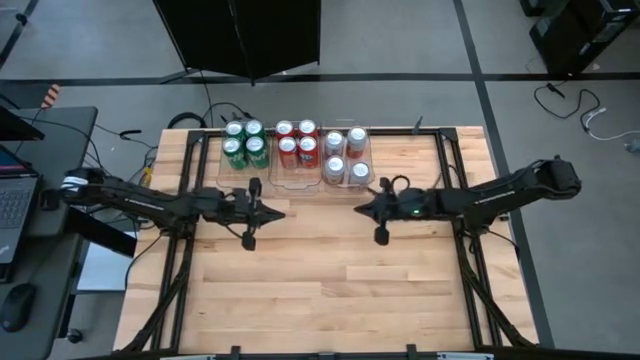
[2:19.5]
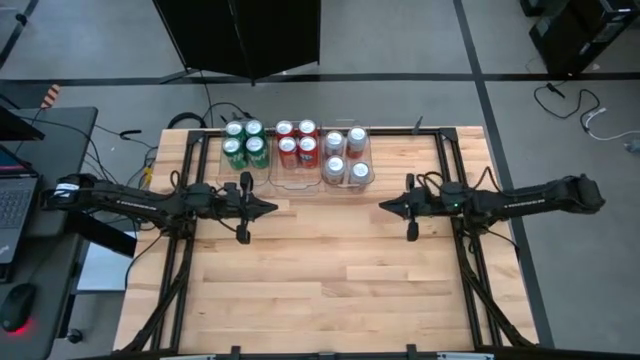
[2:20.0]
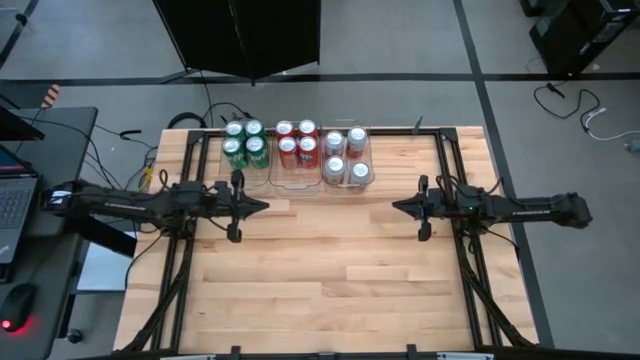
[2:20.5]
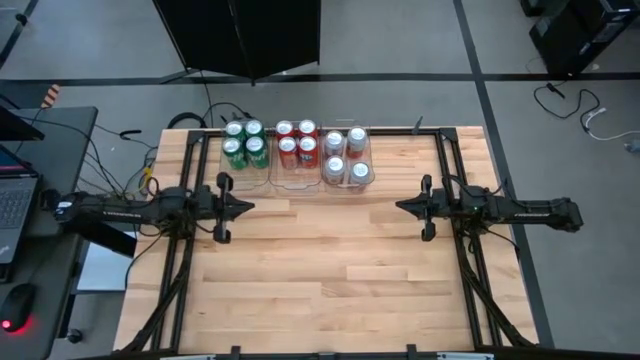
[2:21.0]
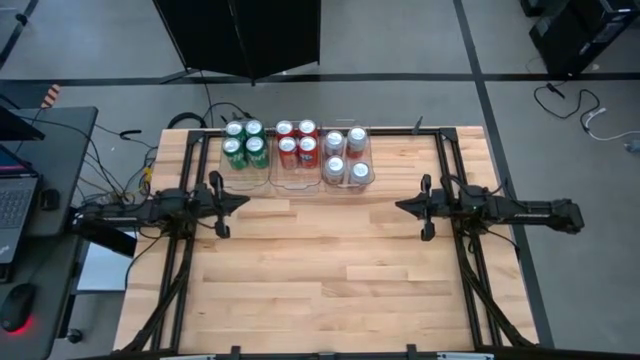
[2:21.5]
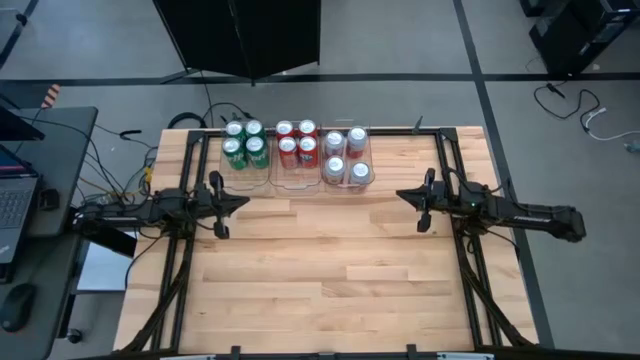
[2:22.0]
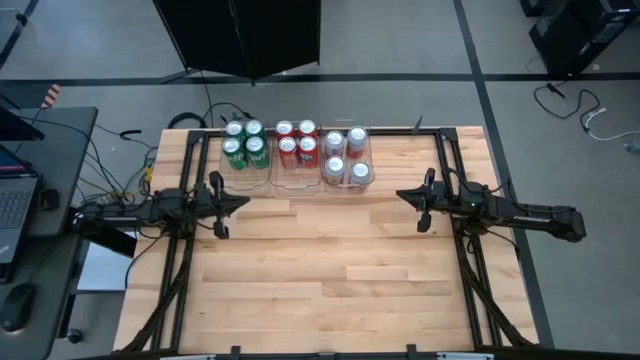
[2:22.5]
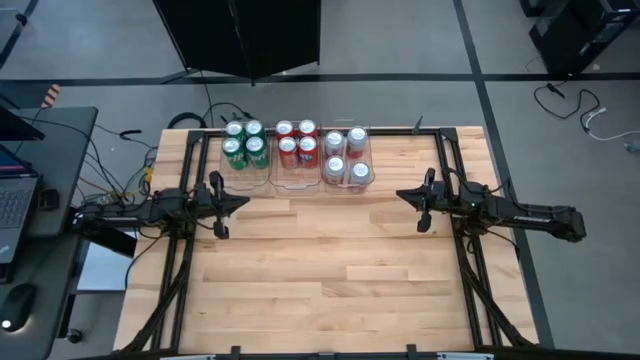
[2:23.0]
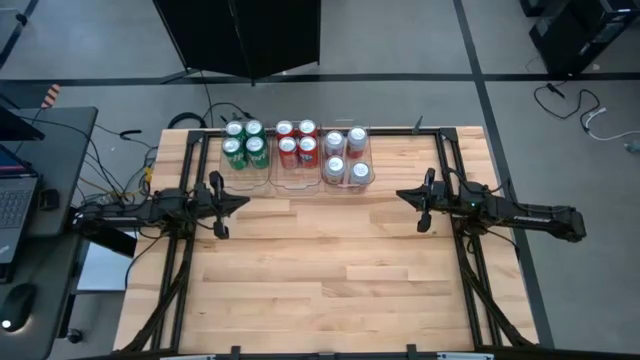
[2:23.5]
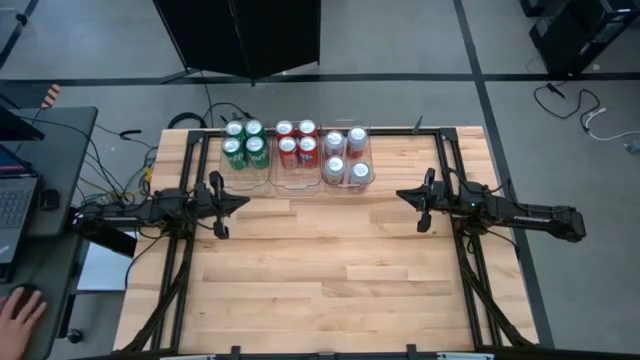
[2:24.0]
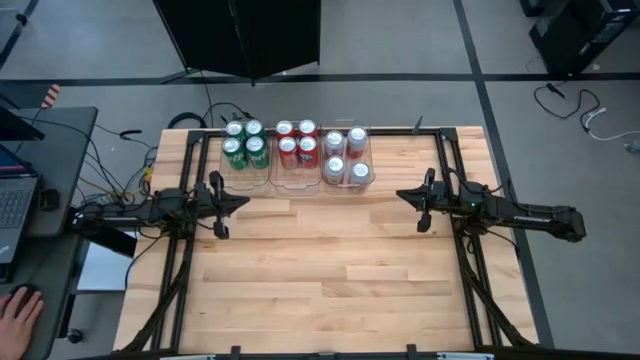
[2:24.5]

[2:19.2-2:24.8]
Task: Sort soda cans
Return to Home Position

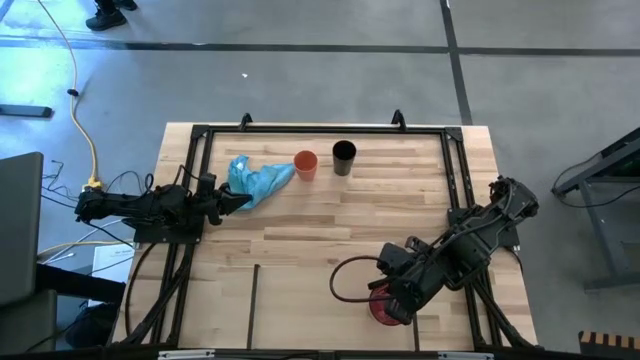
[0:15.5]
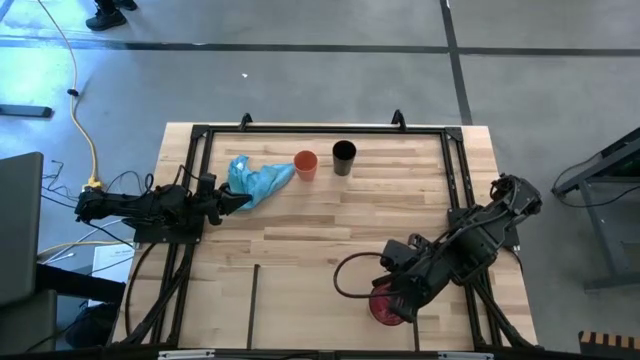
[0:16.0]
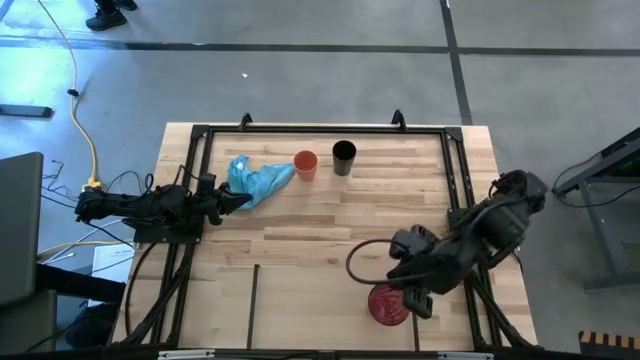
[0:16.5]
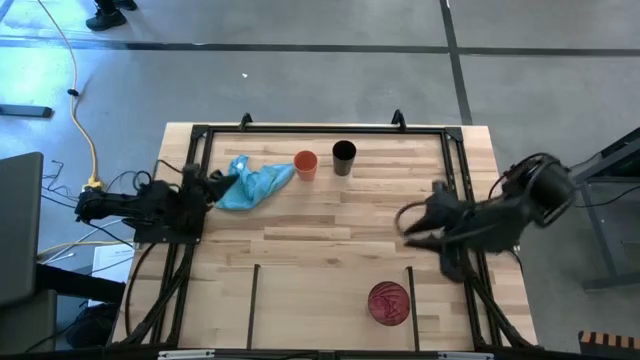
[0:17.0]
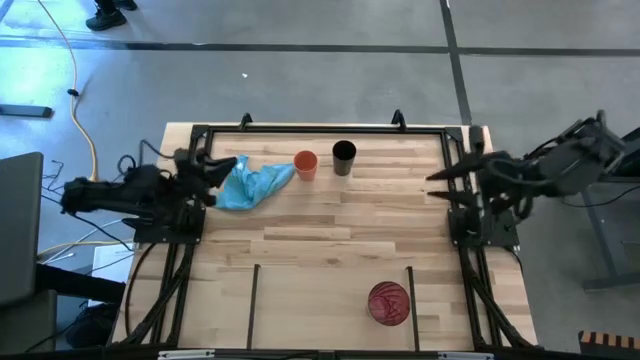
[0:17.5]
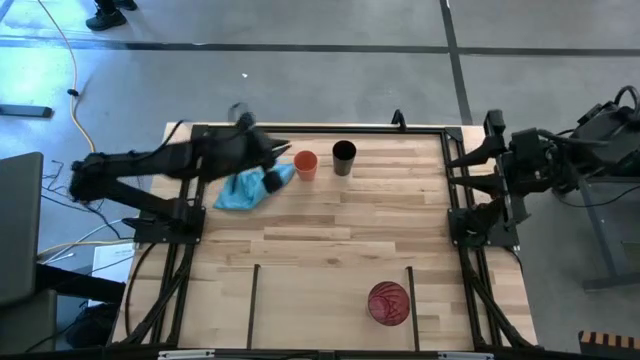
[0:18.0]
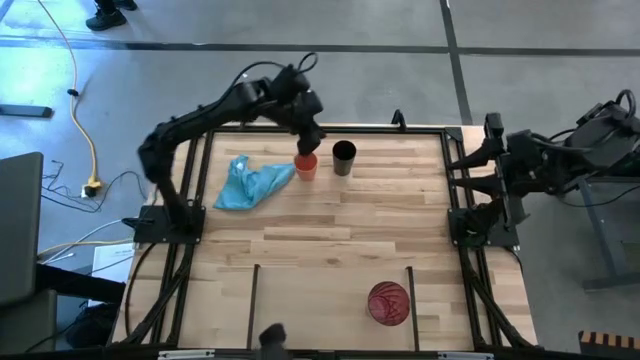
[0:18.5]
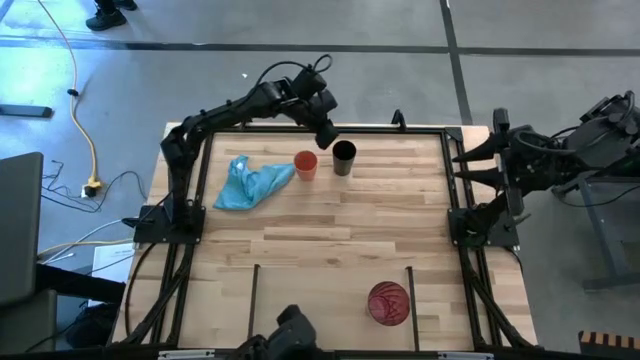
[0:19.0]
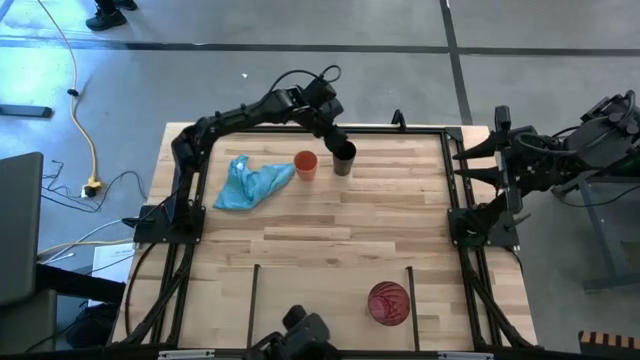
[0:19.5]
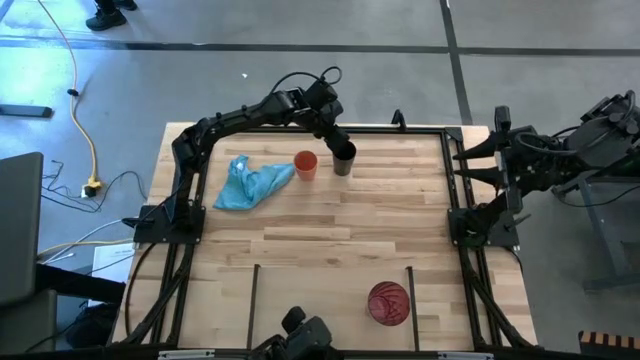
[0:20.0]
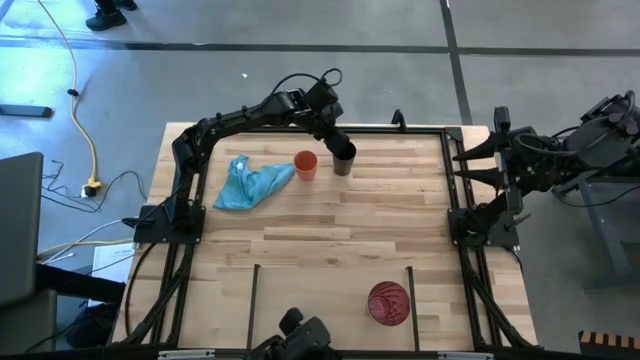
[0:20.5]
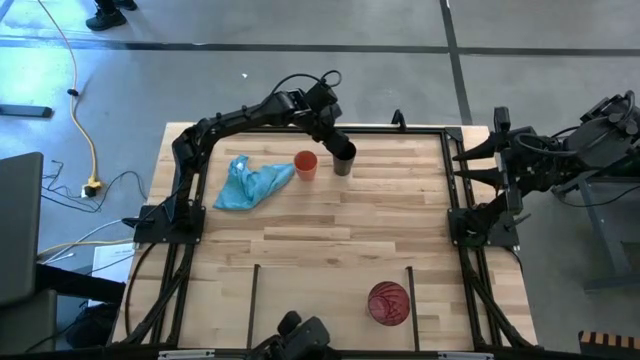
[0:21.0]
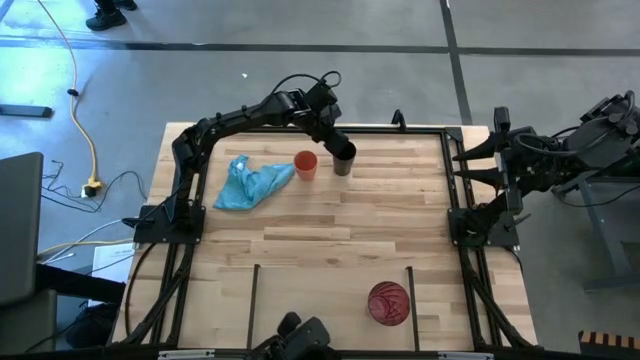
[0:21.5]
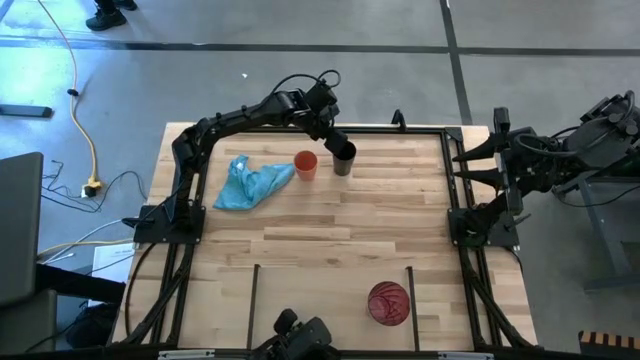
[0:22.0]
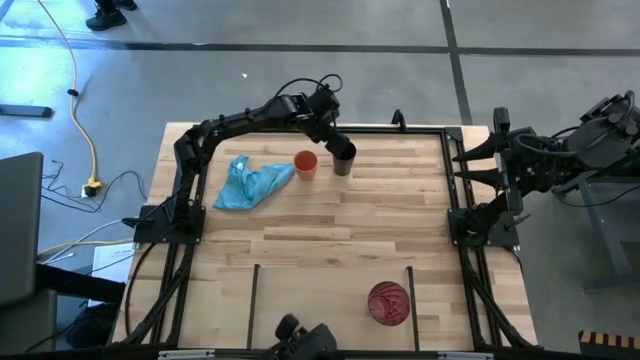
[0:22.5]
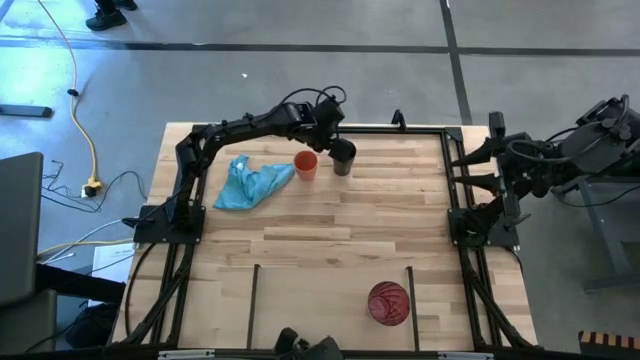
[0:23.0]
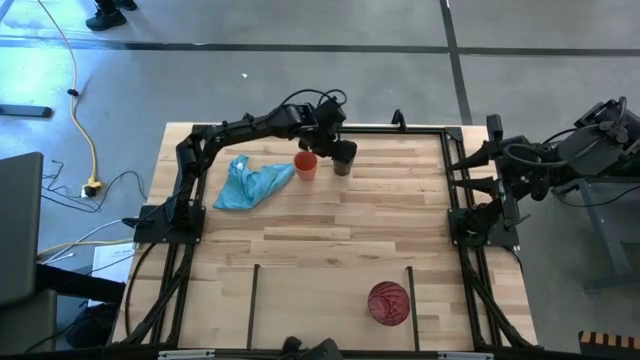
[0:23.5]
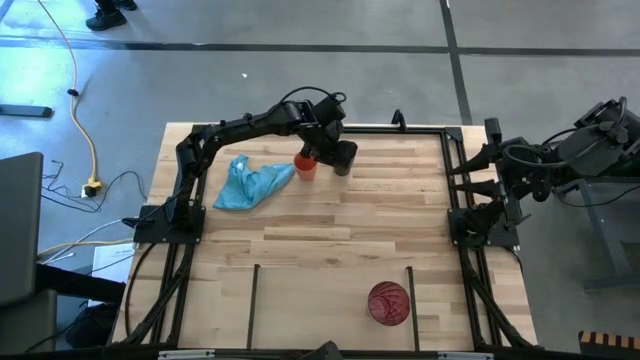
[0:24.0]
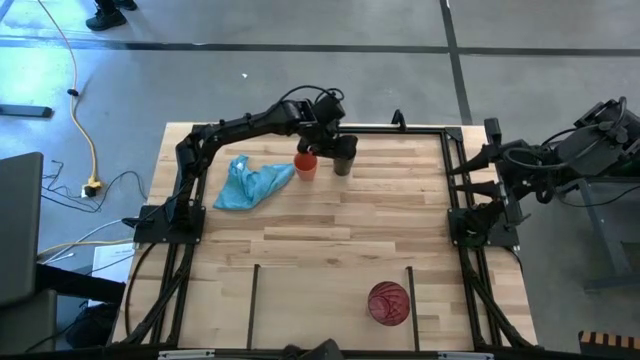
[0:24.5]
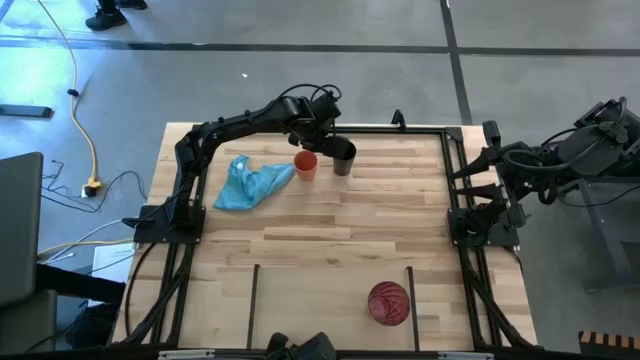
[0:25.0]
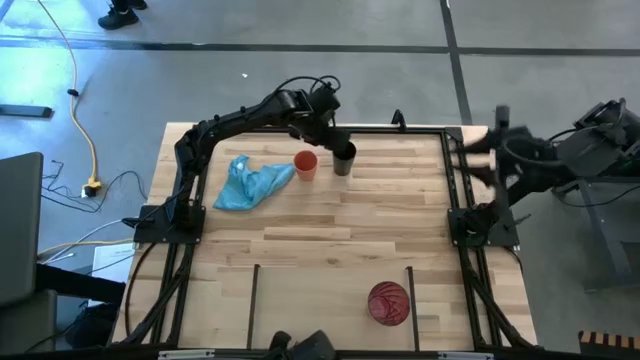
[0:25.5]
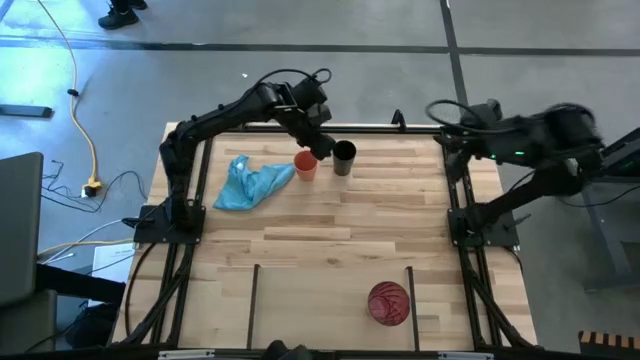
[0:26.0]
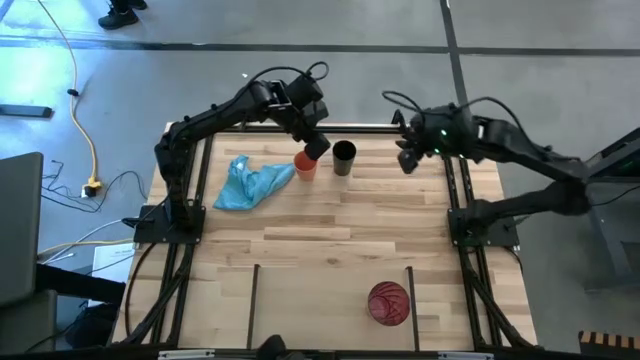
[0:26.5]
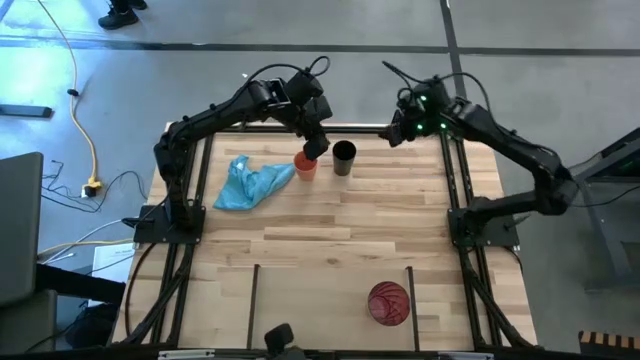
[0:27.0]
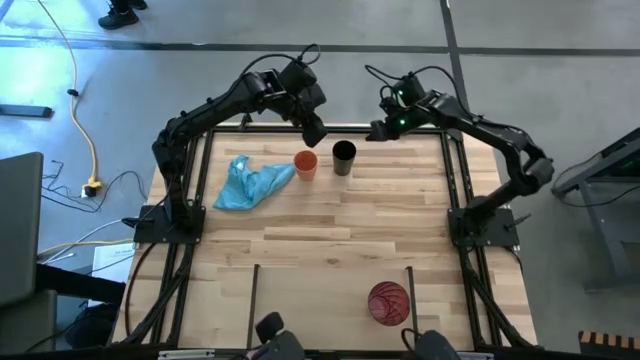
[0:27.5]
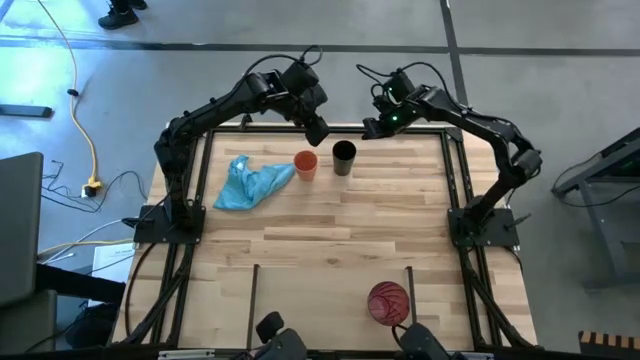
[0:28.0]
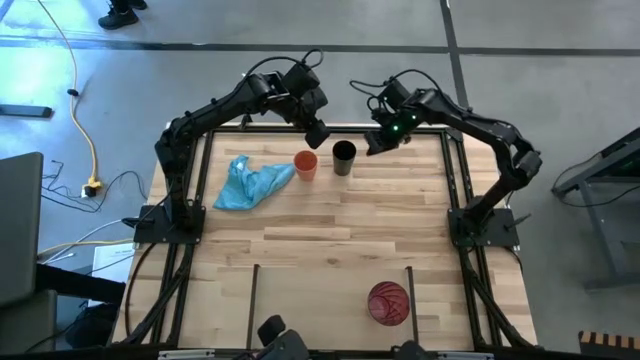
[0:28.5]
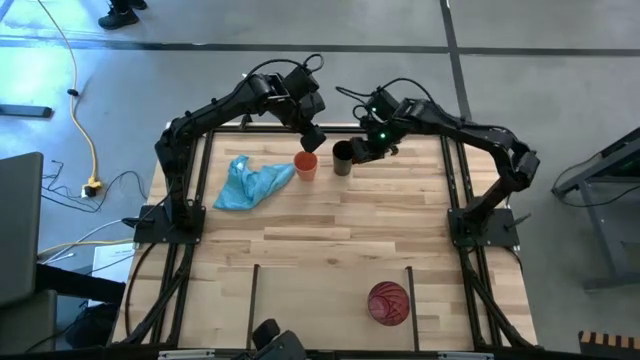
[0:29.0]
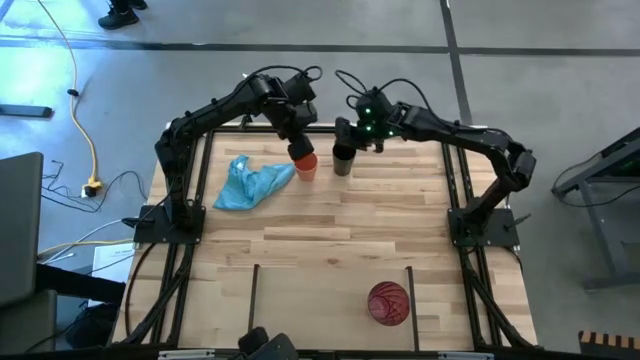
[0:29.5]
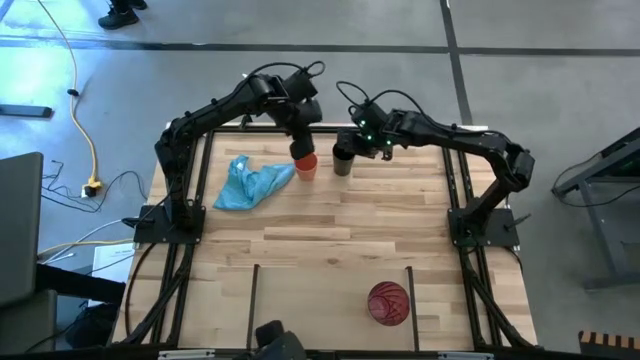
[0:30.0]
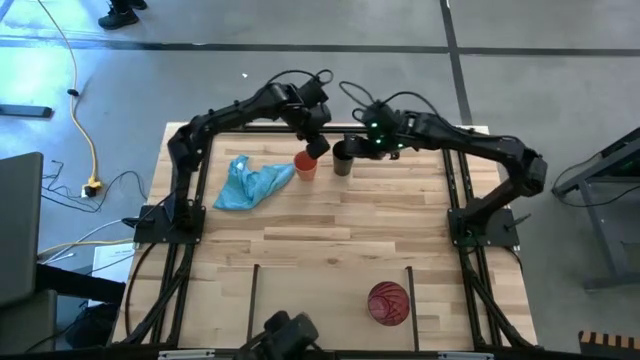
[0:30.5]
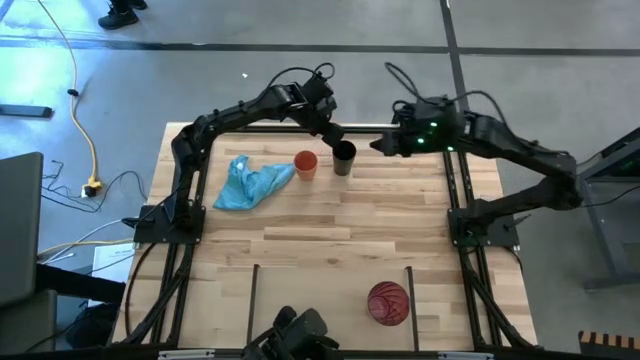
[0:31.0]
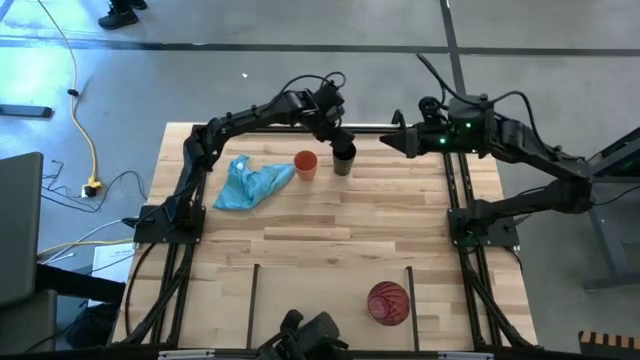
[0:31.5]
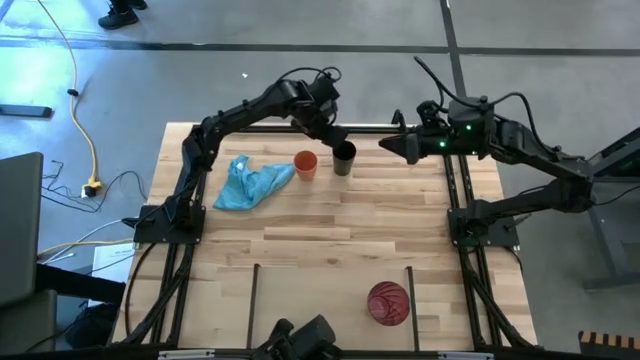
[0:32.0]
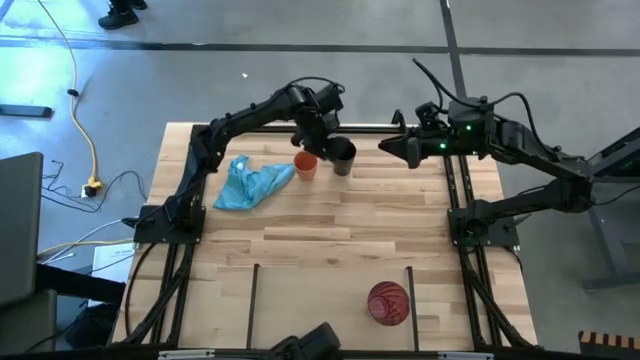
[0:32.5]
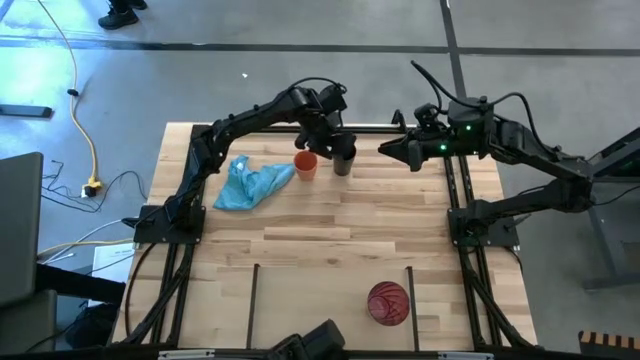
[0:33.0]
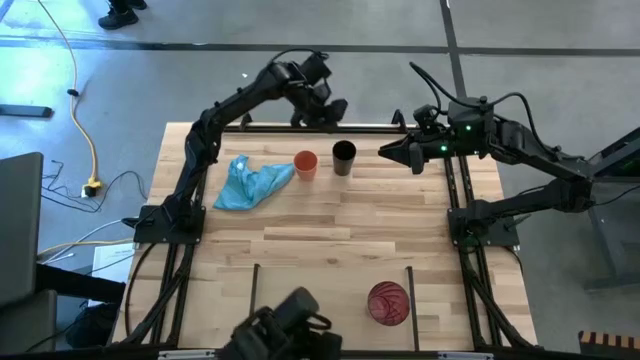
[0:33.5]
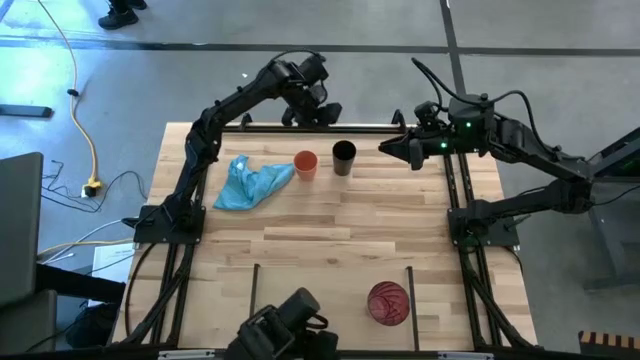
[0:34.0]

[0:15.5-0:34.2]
Task: Stack small to large cups/mugs on shelf
Put the black cup on the shelf
